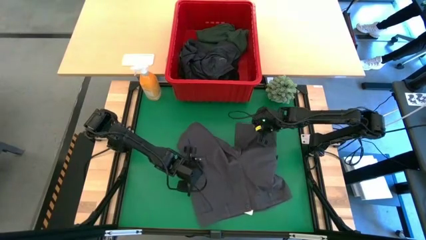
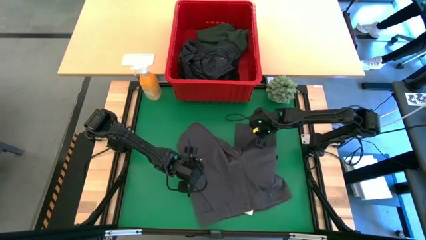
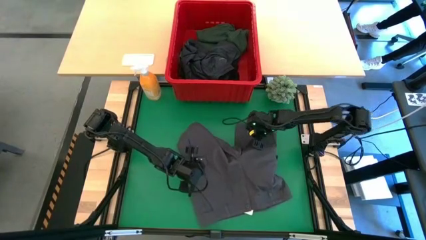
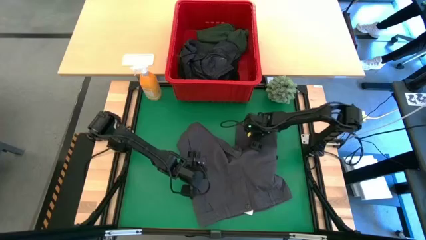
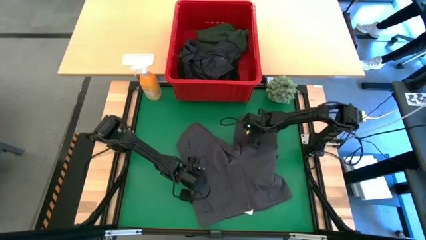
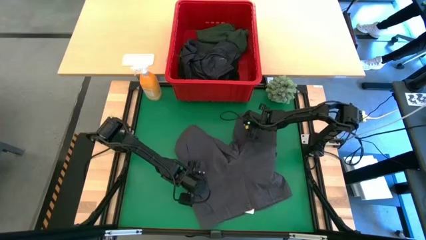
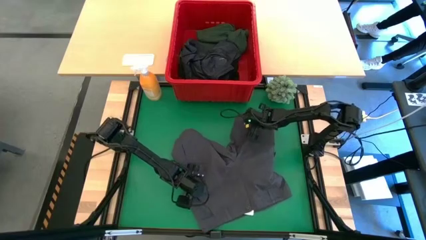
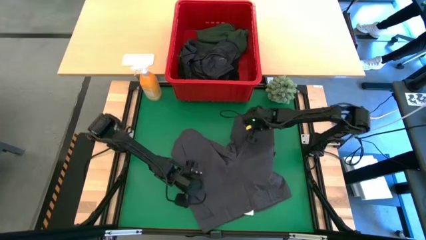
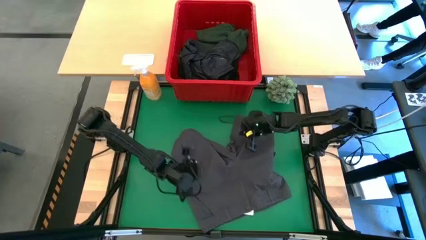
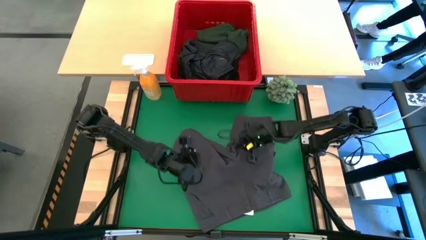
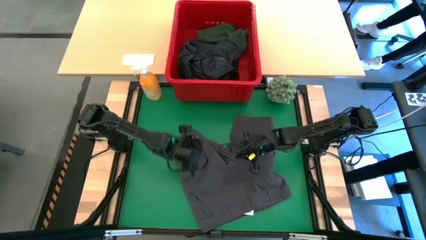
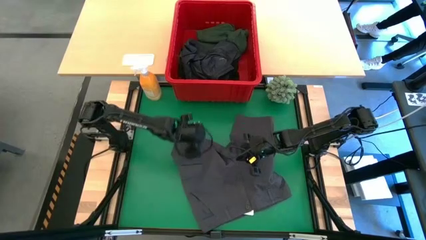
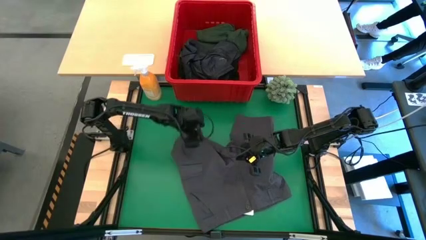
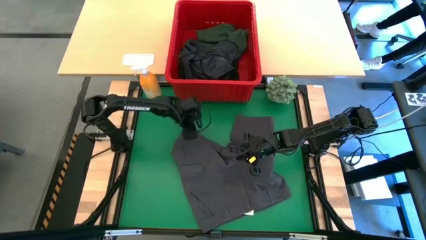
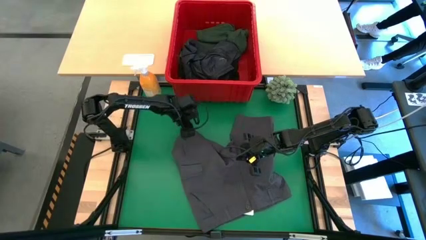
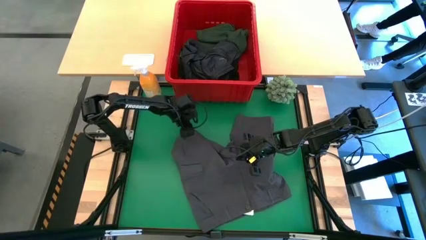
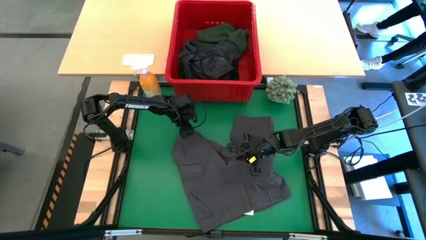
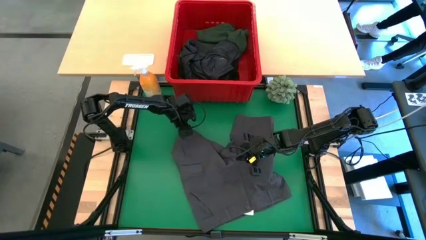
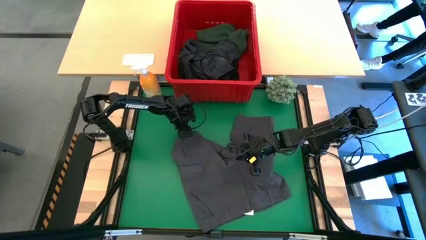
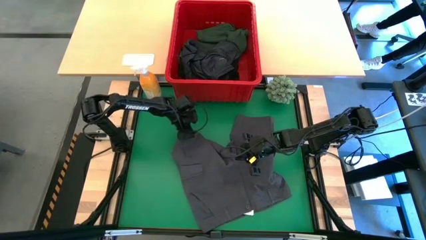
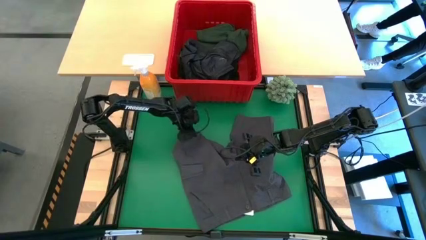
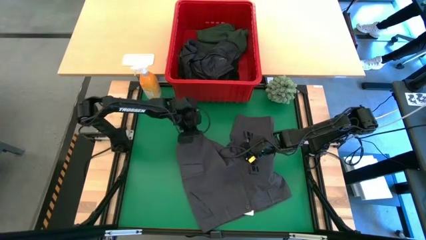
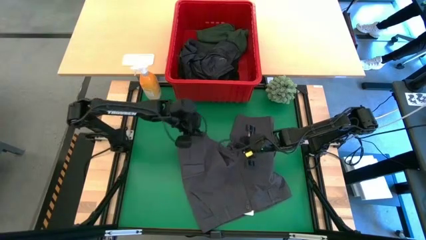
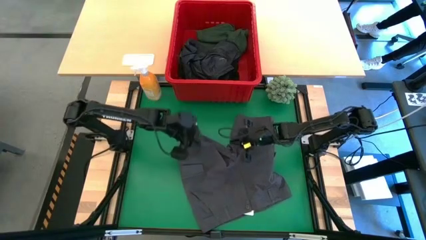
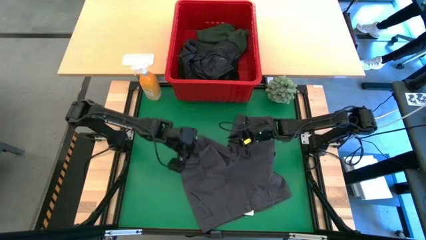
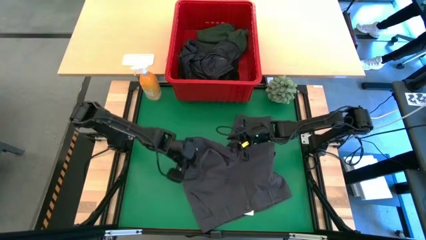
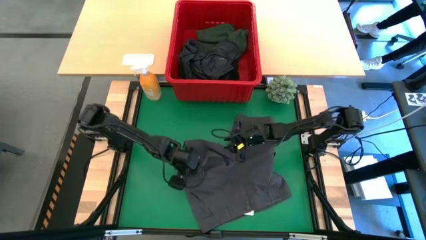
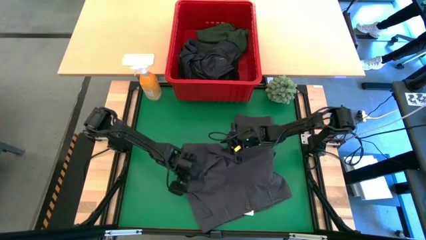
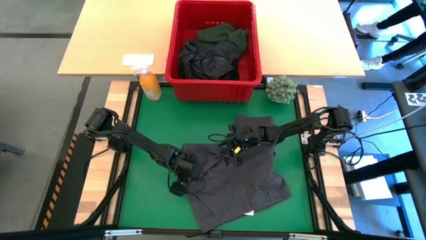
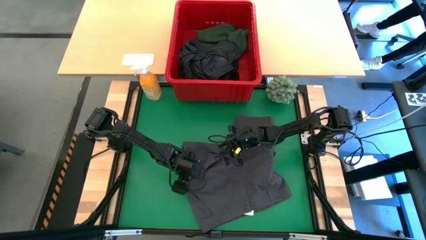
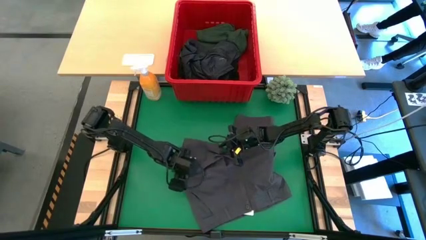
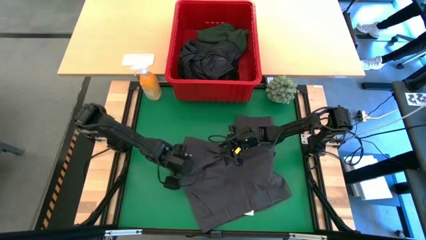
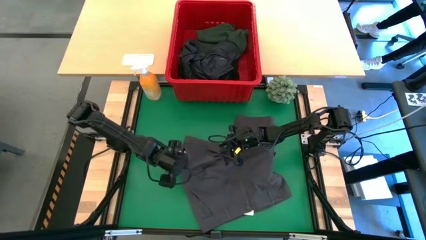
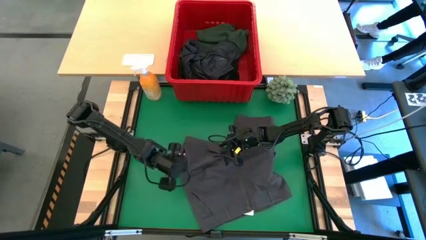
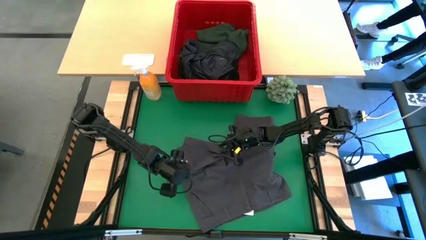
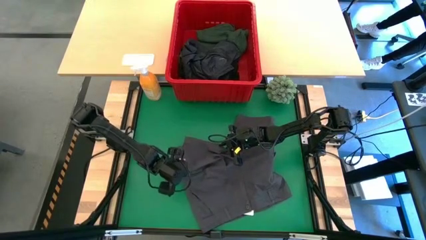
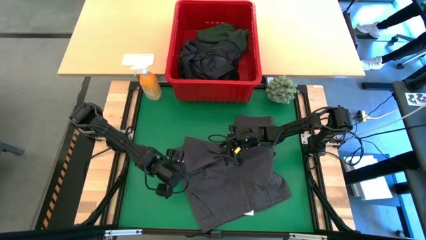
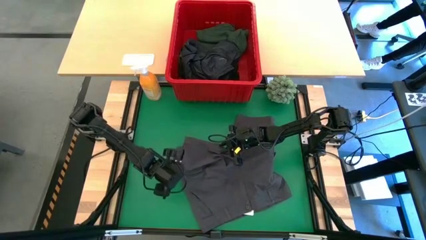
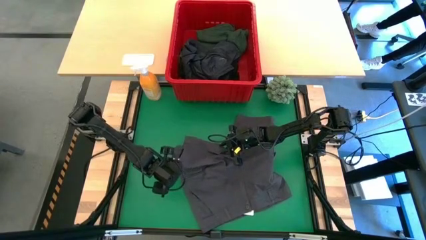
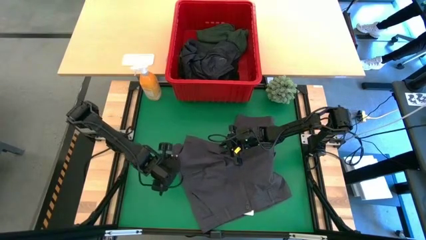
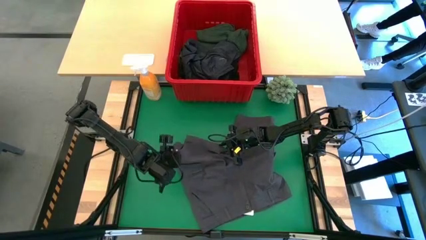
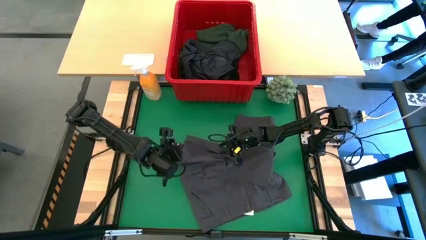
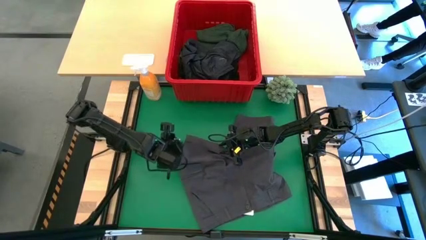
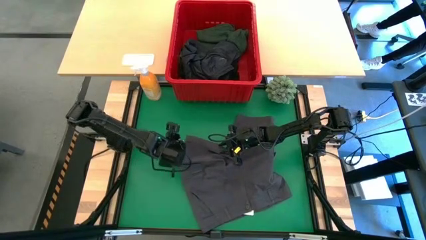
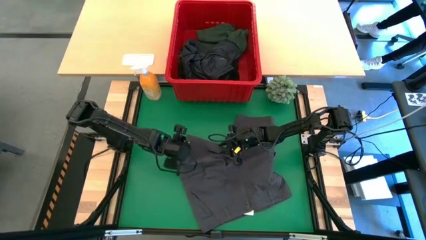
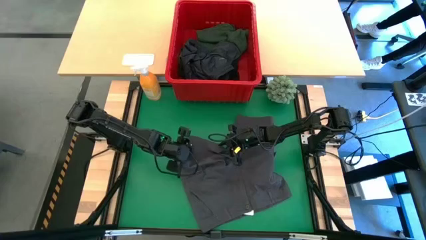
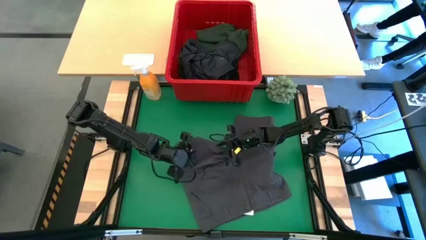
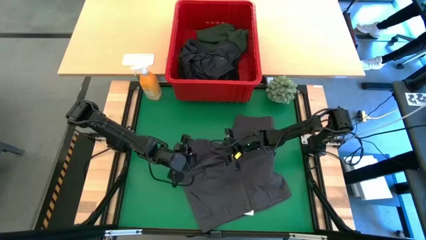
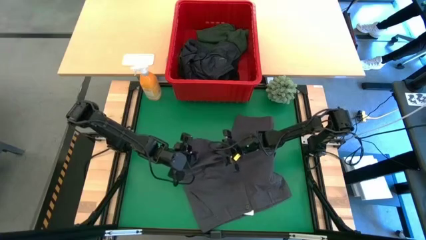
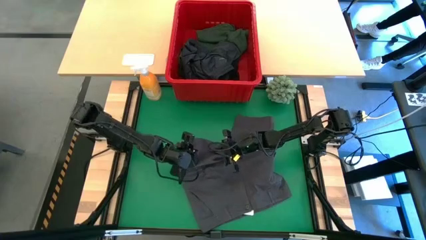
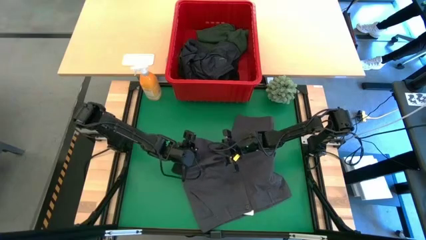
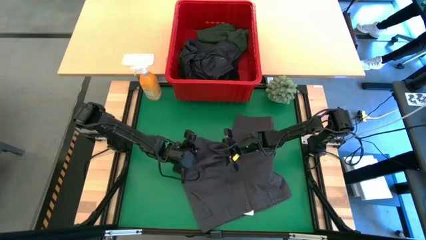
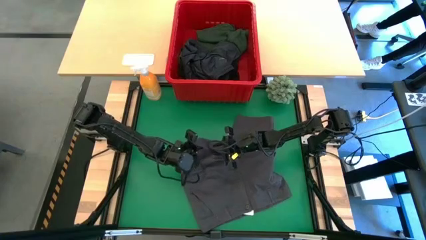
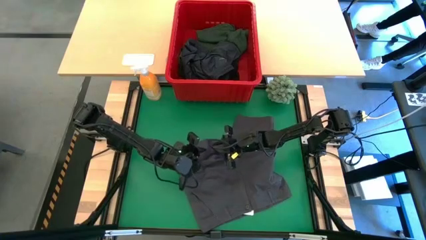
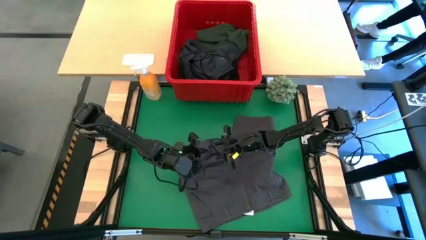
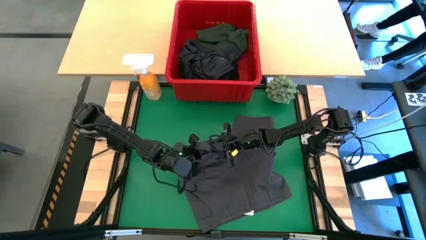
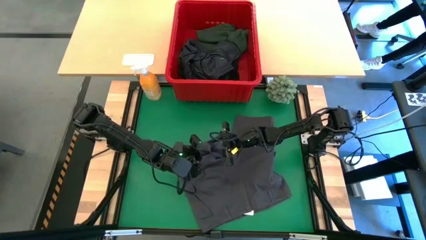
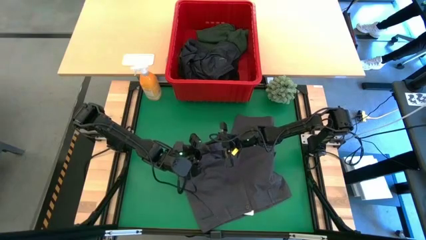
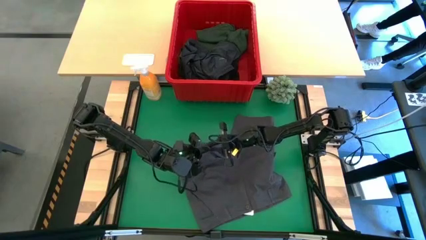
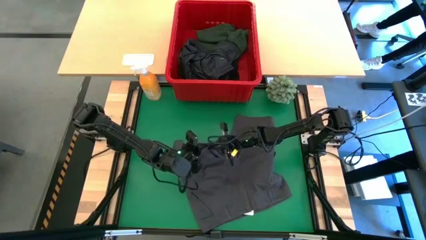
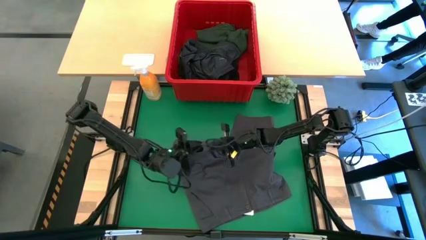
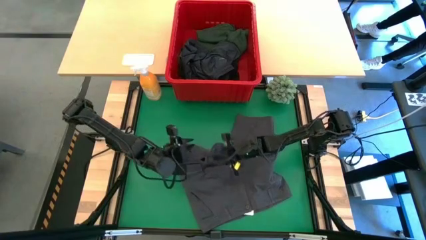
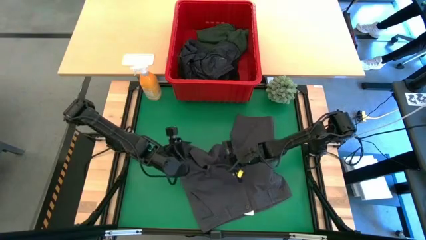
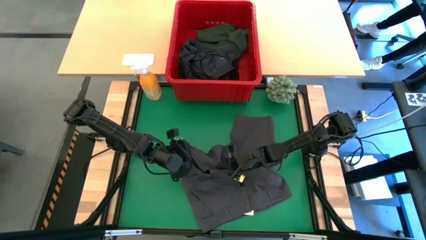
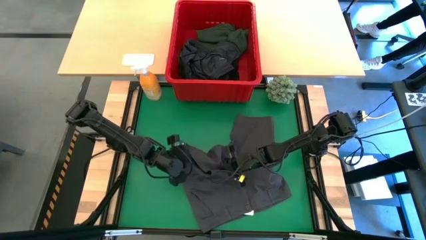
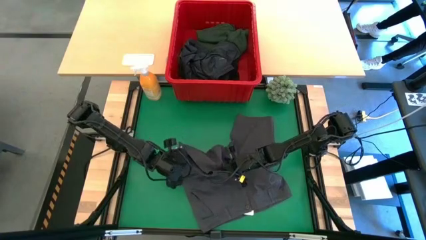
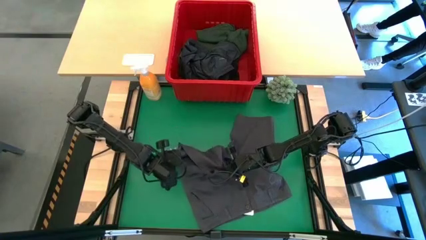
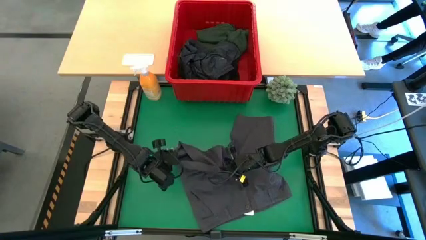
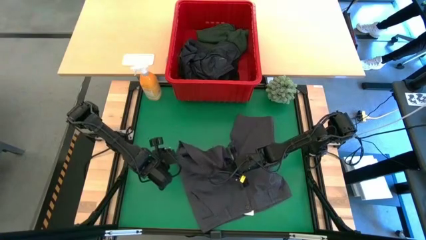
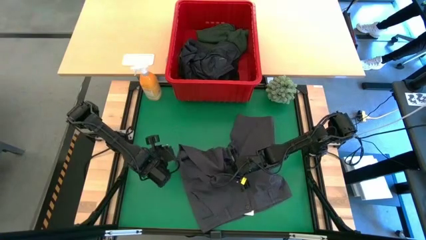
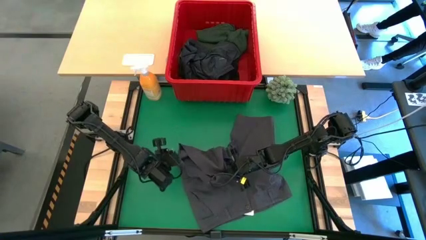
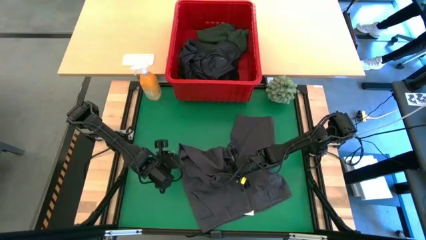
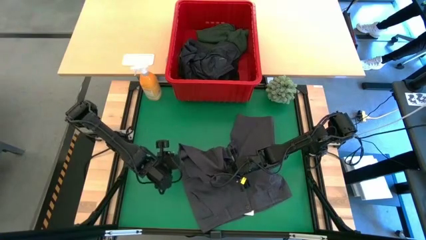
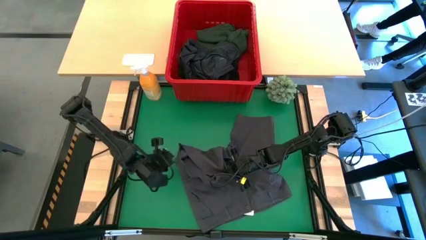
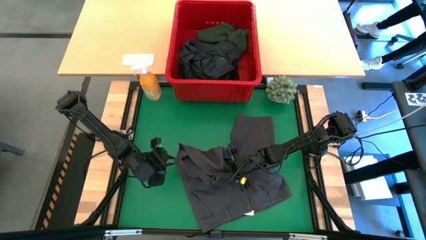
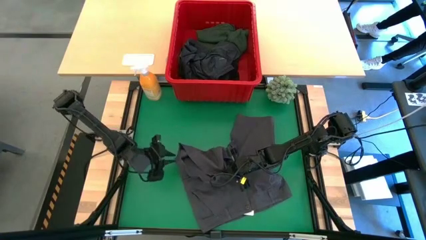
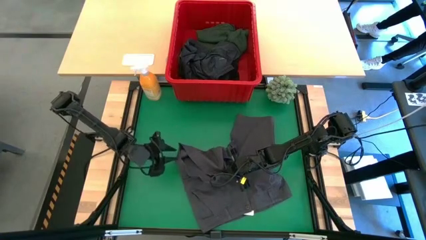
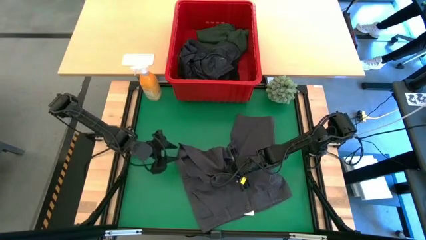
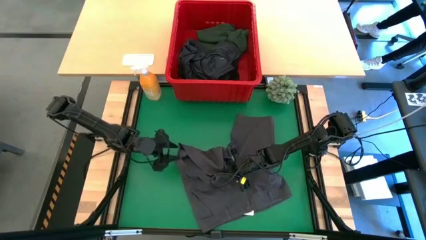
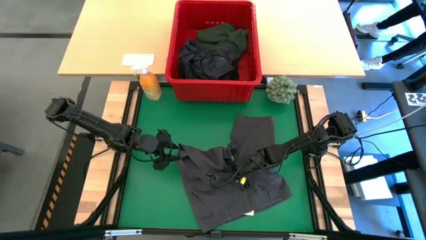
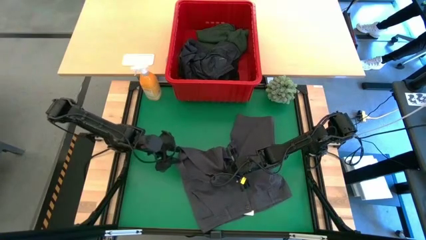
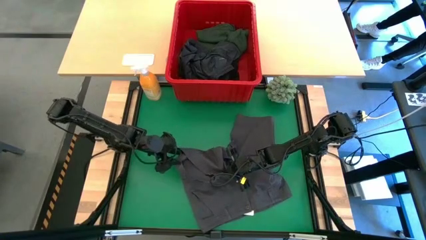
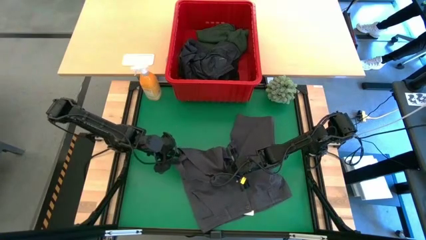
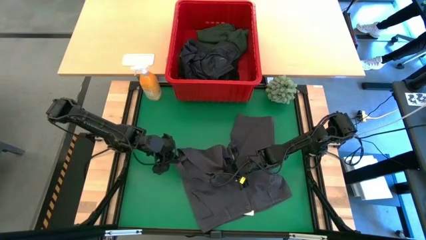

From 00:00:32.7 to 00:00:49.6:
Task: Fold Laundry from Bin
Fold the gray short
